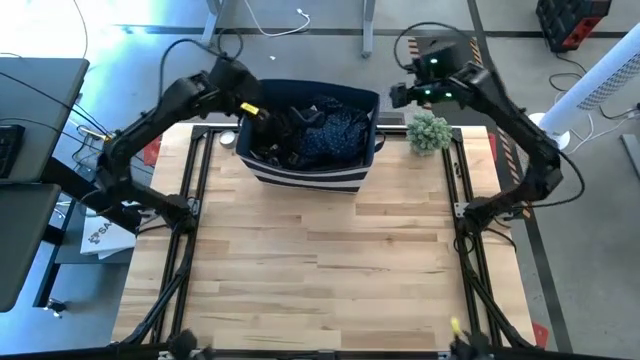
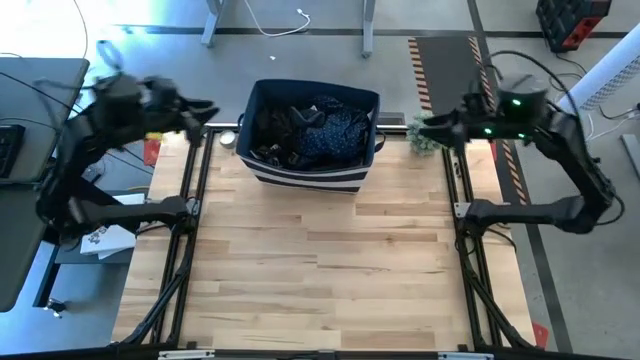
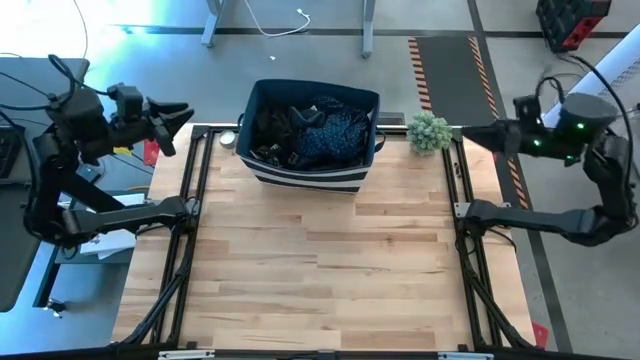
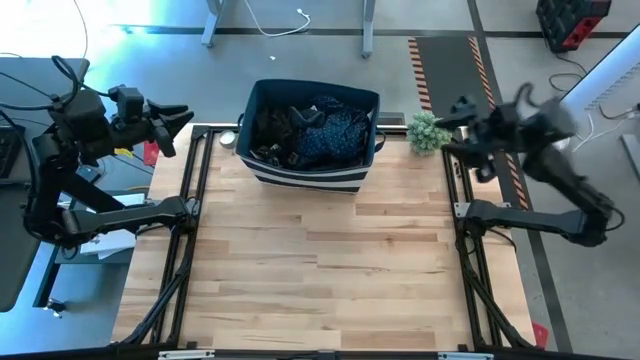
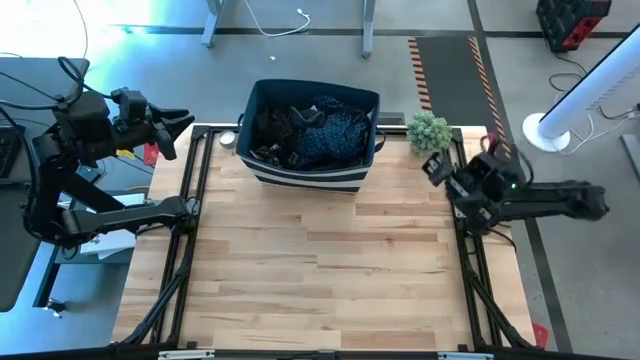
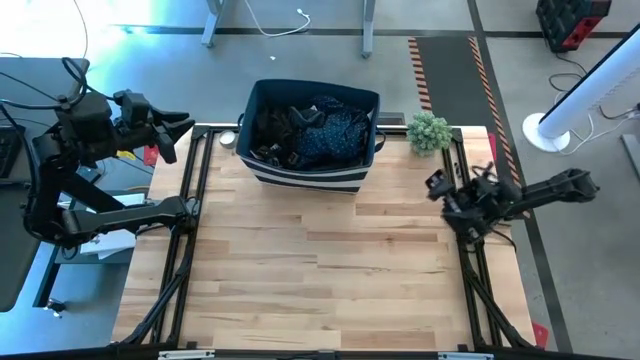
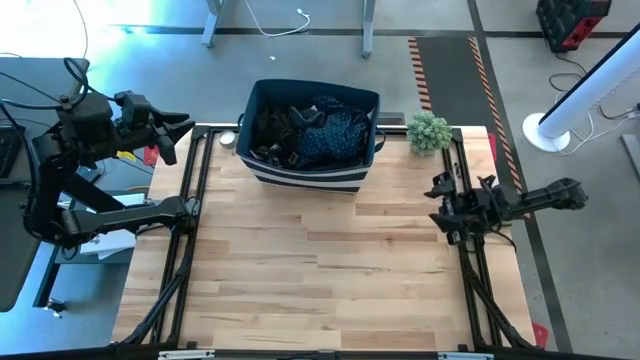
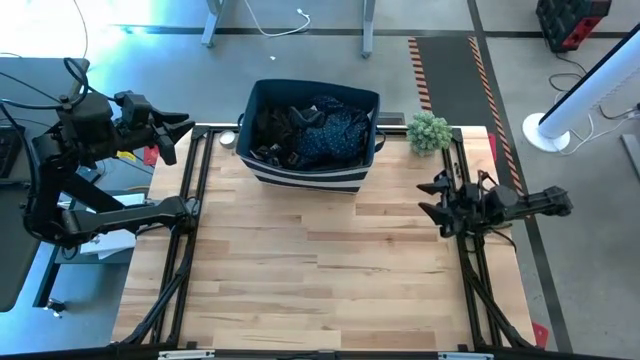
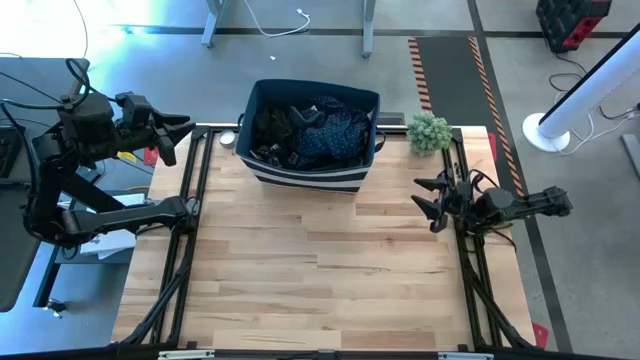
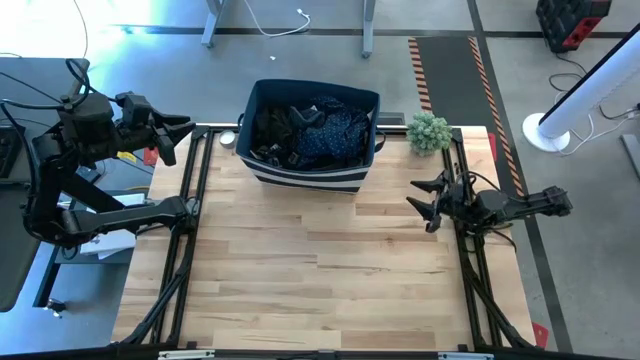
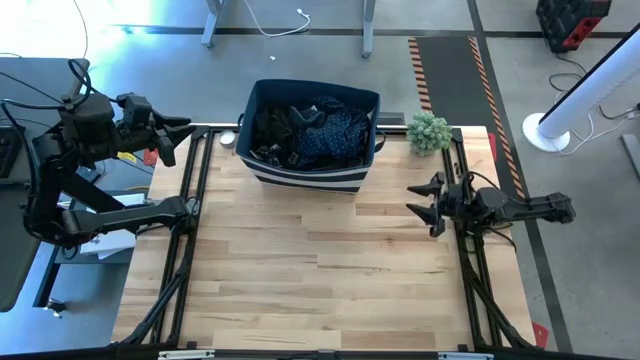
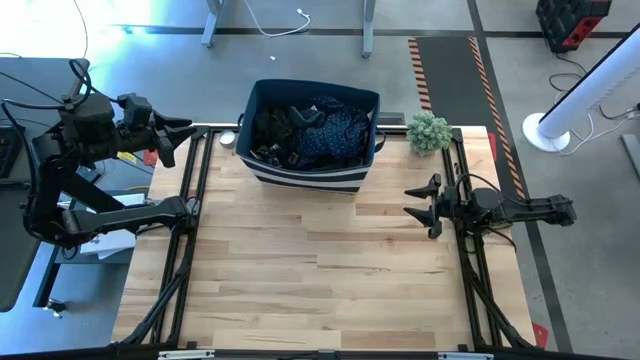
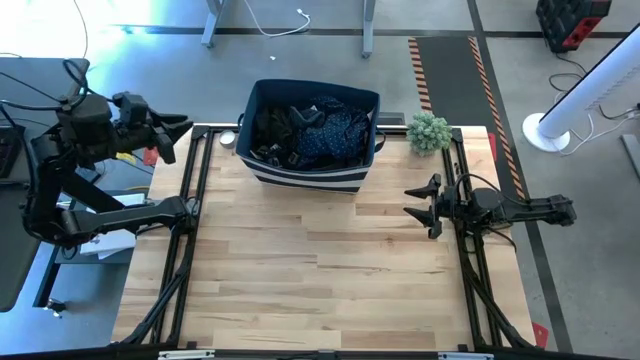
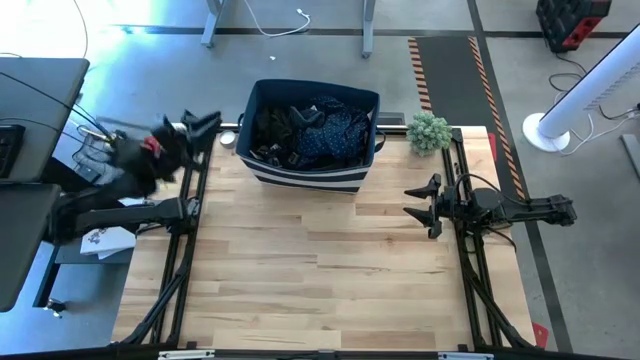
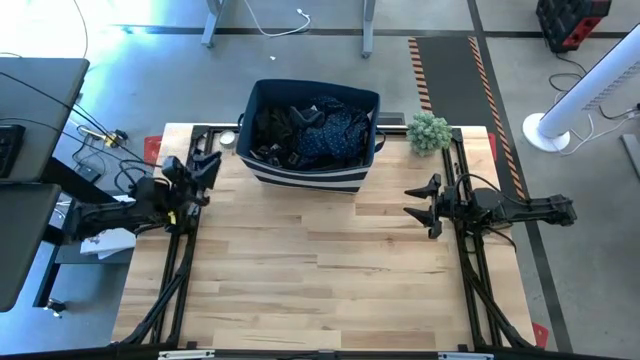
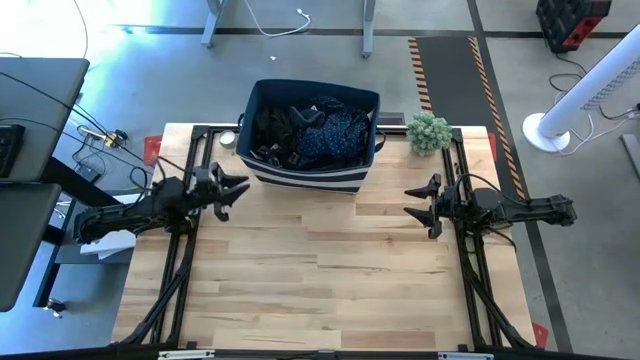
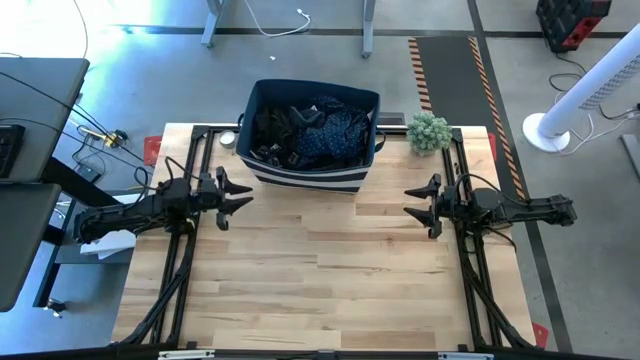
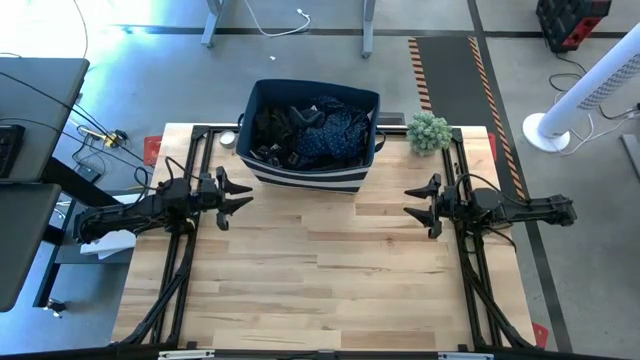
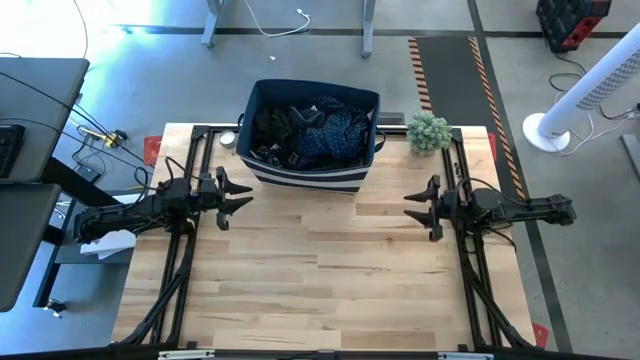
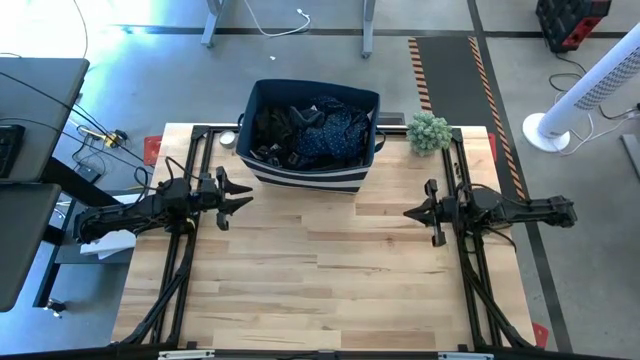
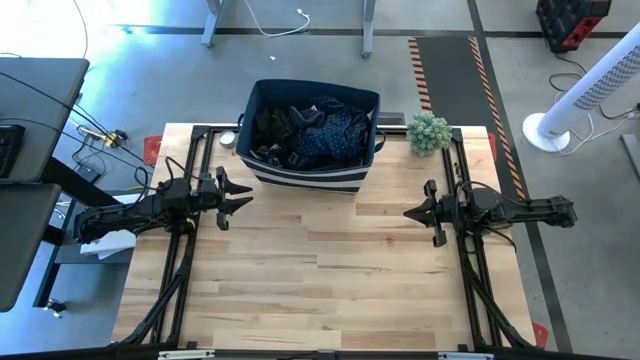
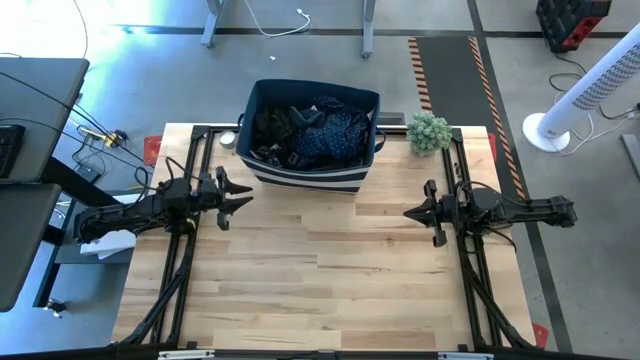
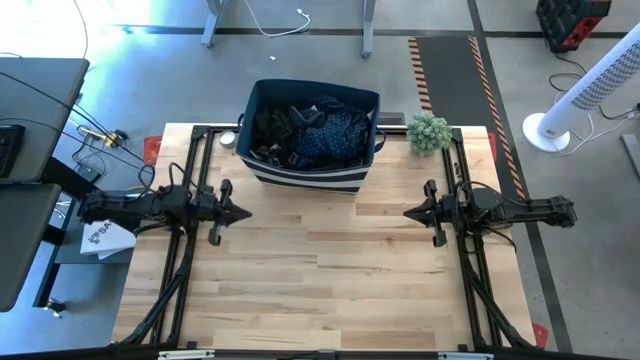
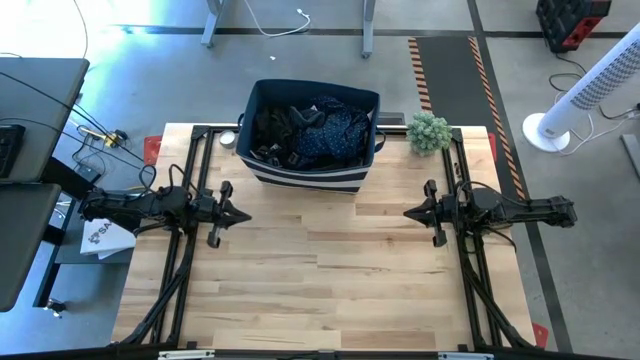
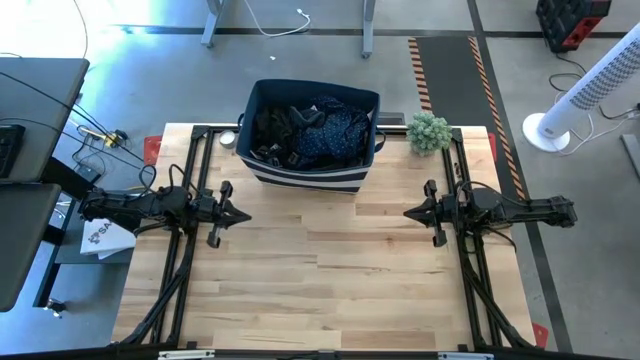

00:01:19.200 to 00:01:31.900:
Task: Sort clothes
Return to Home Position

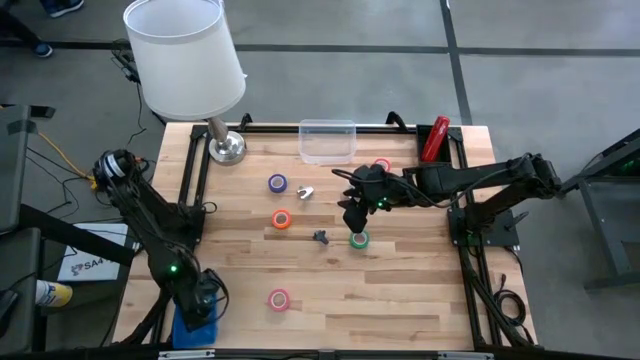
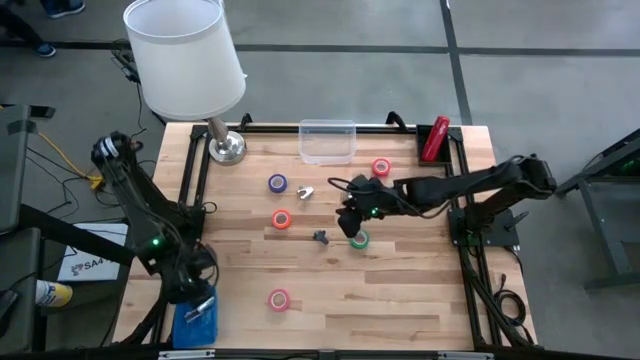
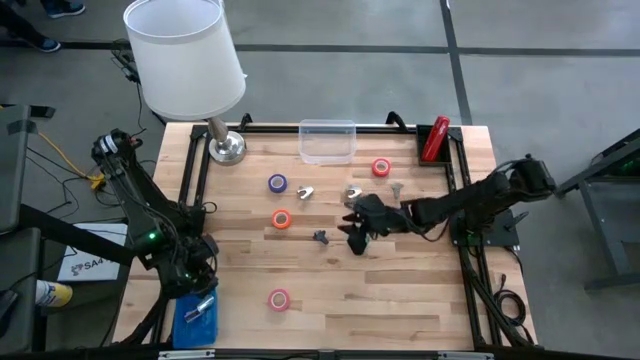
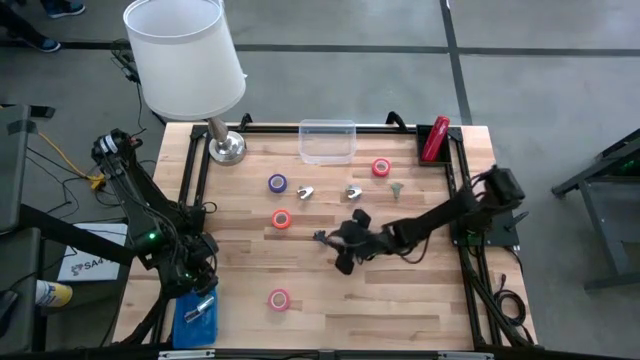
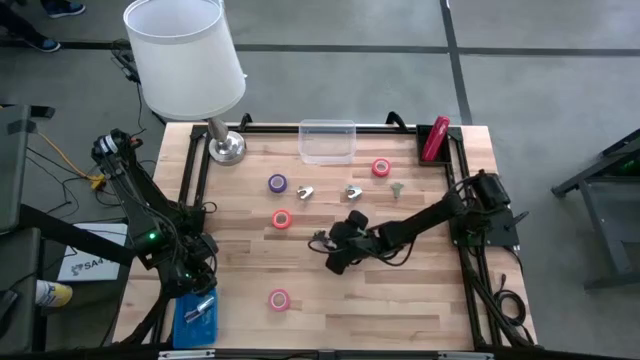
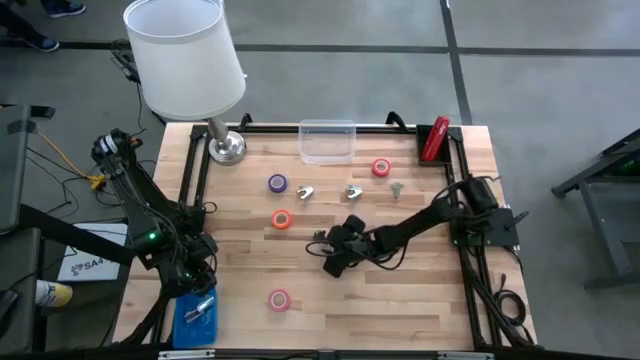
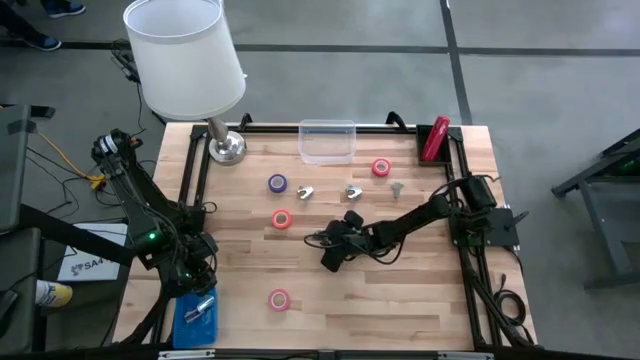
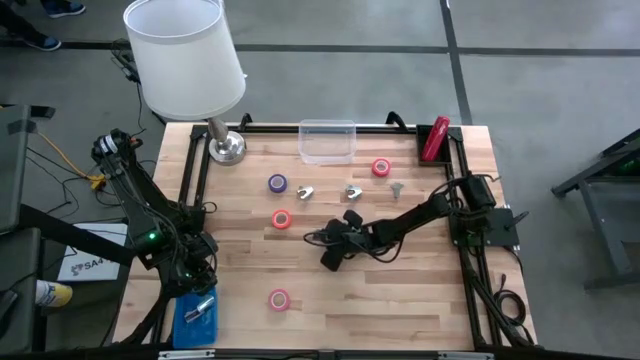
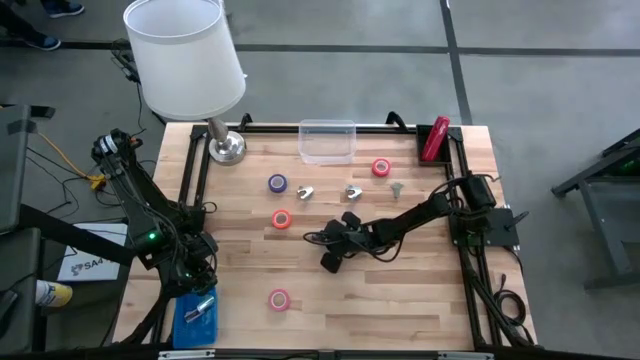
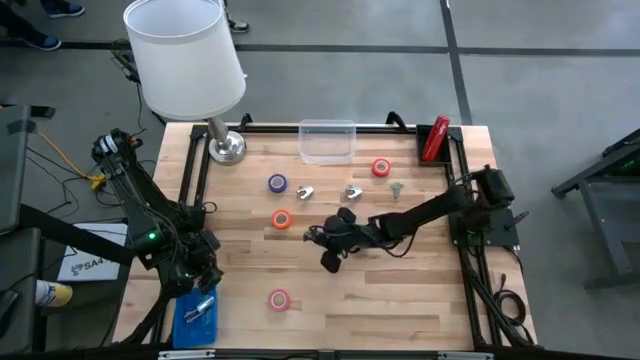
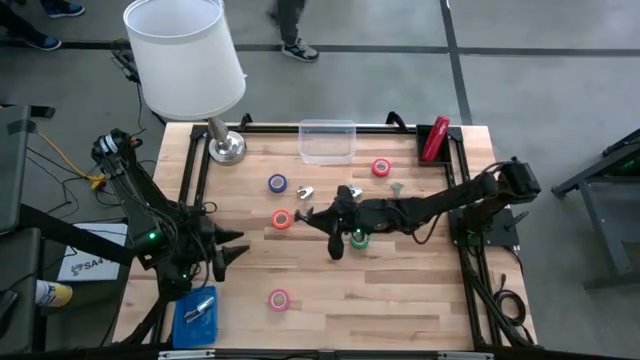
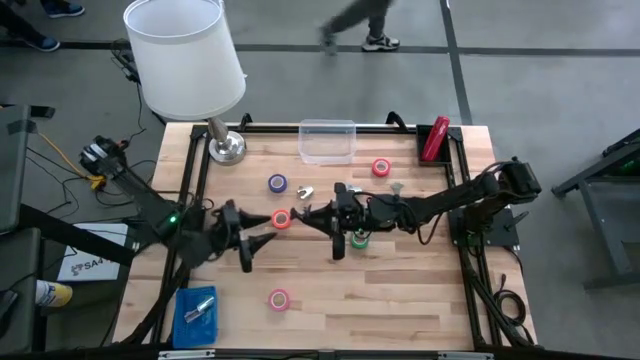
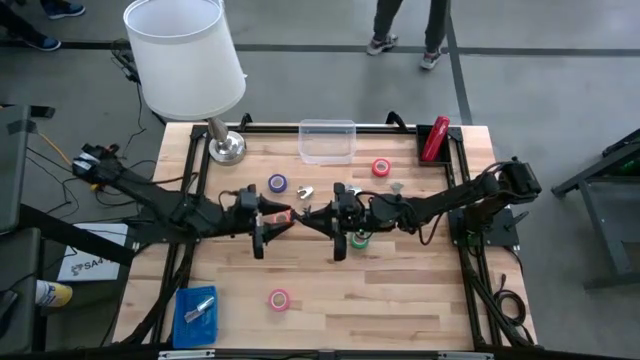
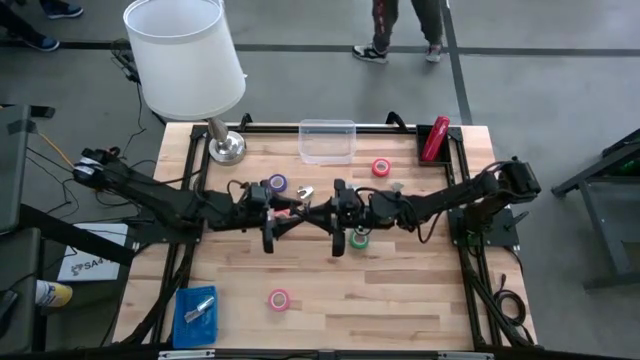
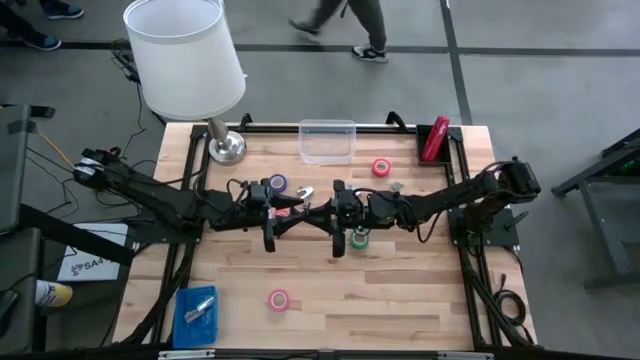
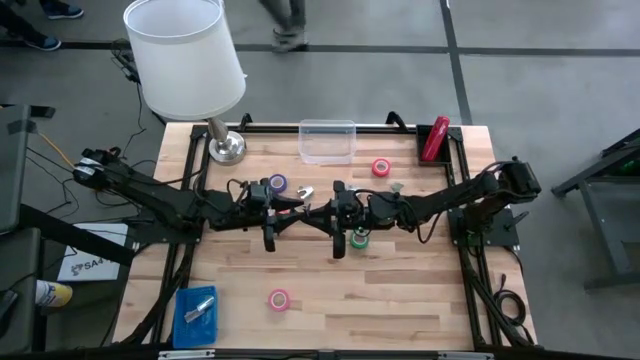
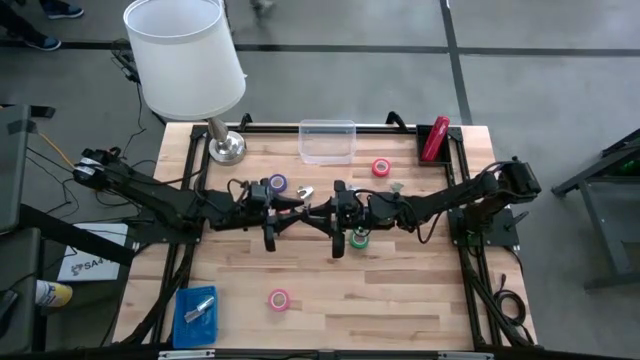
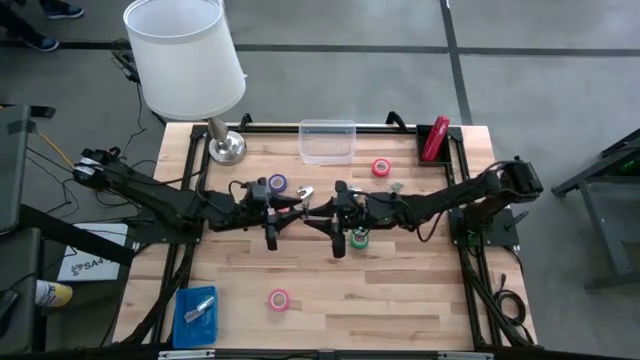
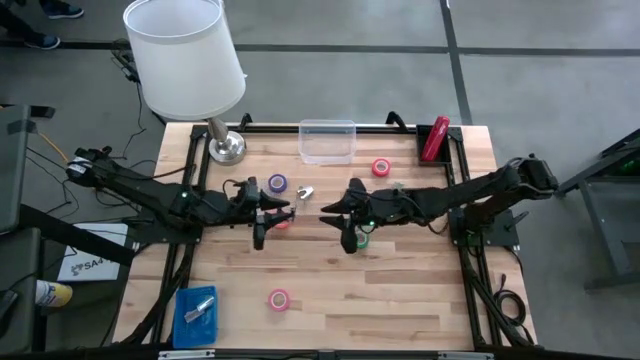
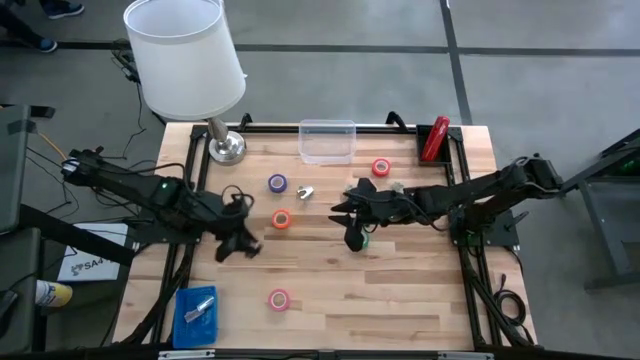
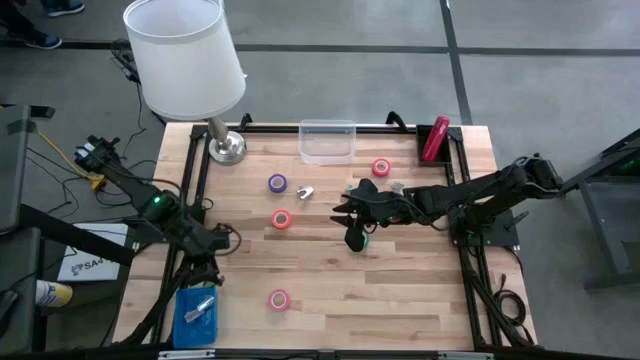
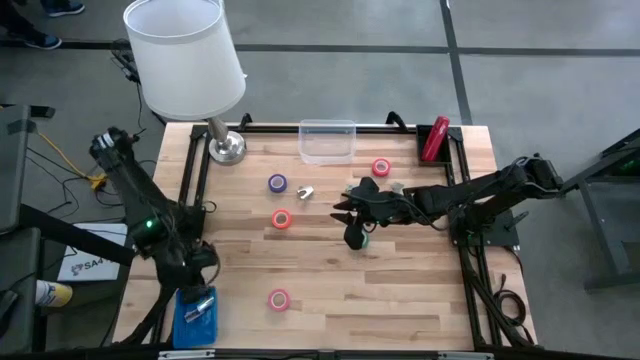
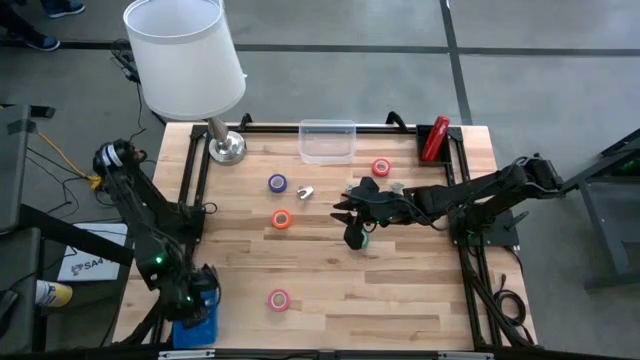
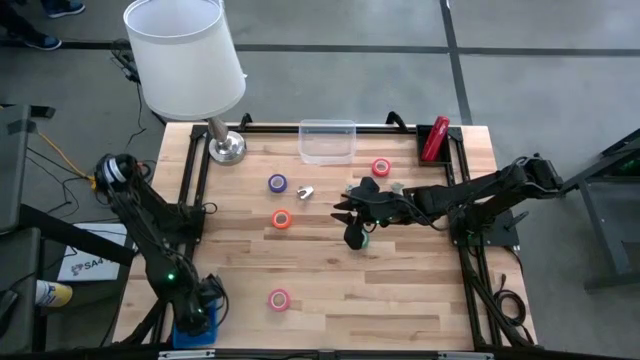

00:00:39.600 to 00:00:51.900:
Task: Pick and place Stapler, Stapler remover, tape
Put the black staple remover into the blue bin
